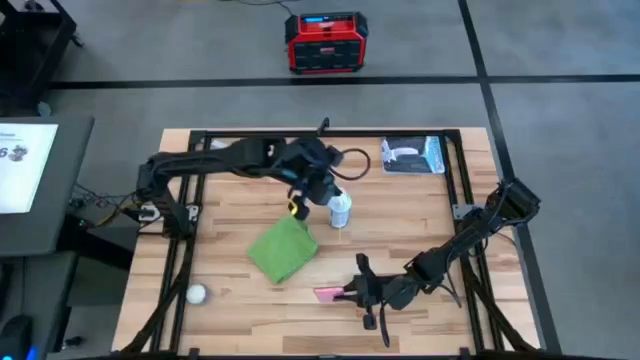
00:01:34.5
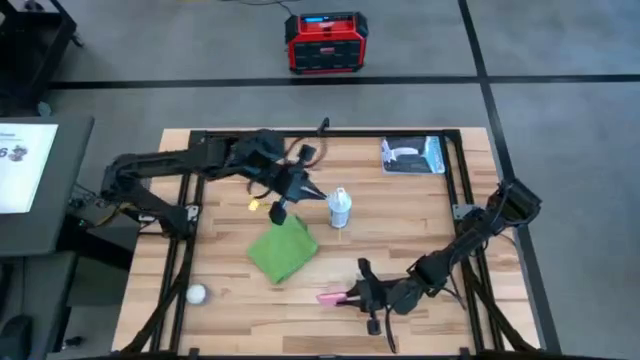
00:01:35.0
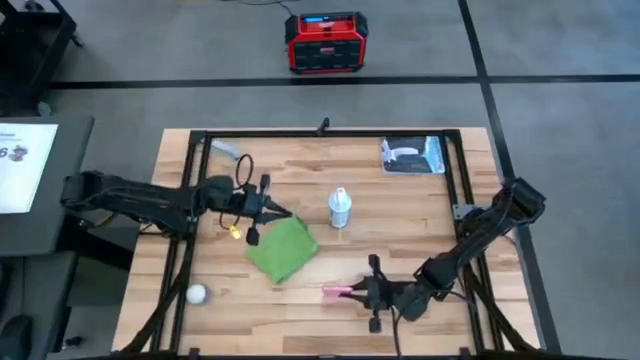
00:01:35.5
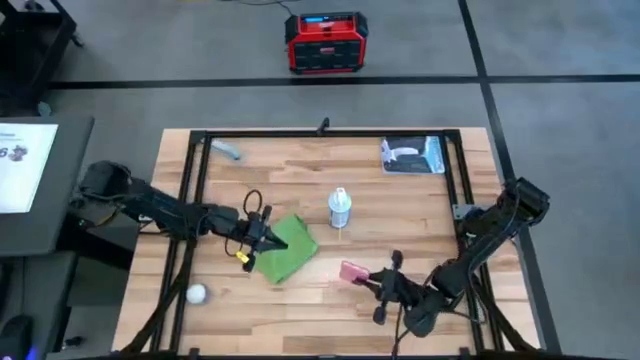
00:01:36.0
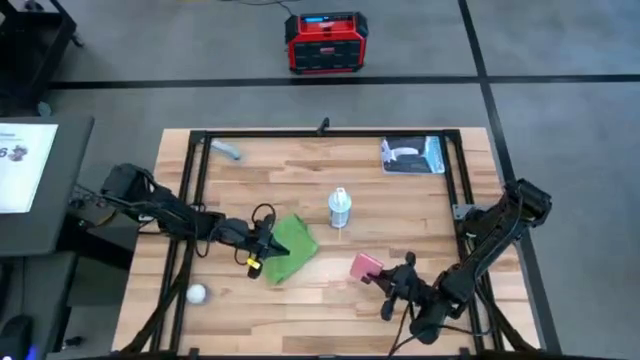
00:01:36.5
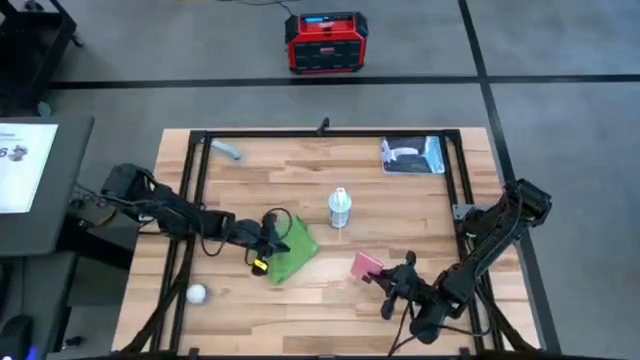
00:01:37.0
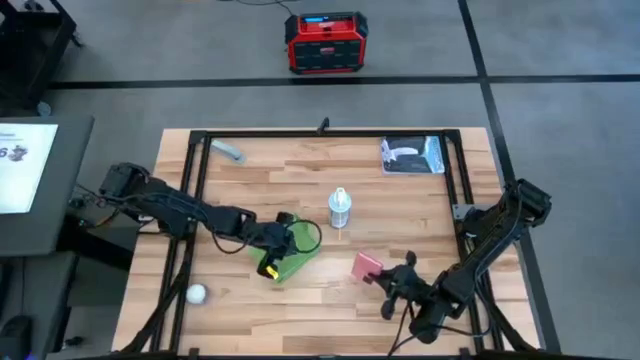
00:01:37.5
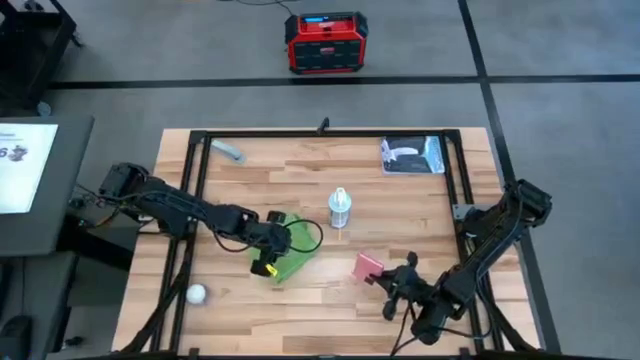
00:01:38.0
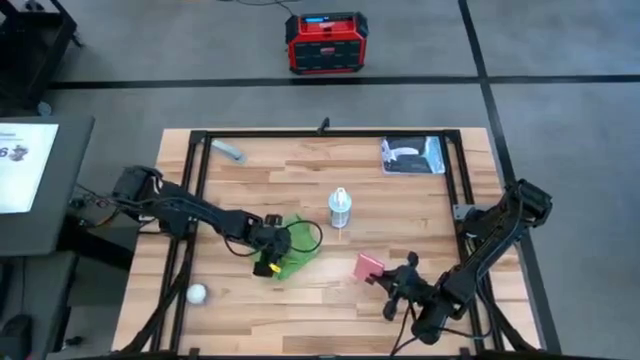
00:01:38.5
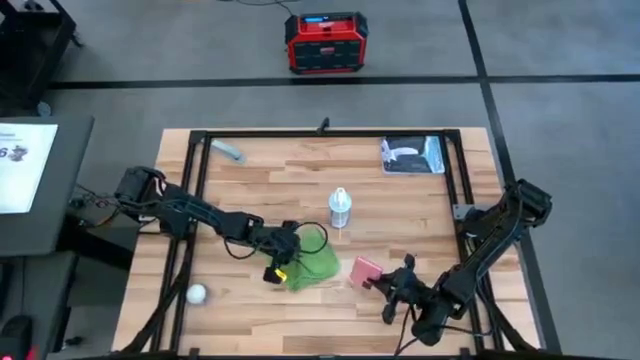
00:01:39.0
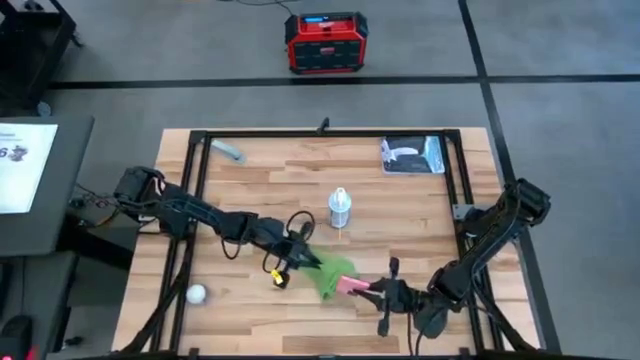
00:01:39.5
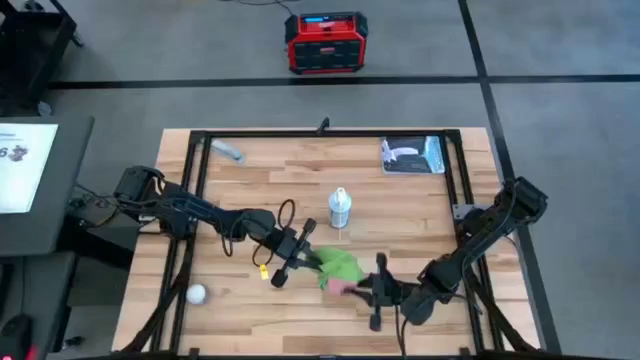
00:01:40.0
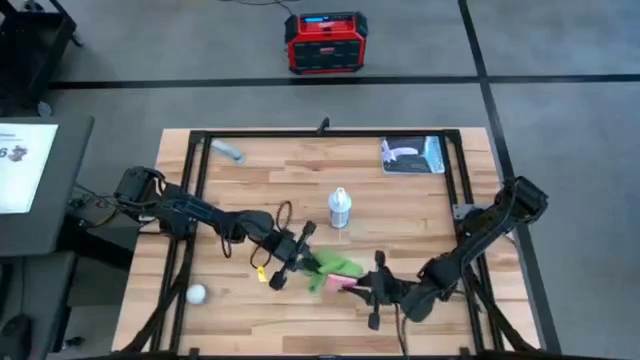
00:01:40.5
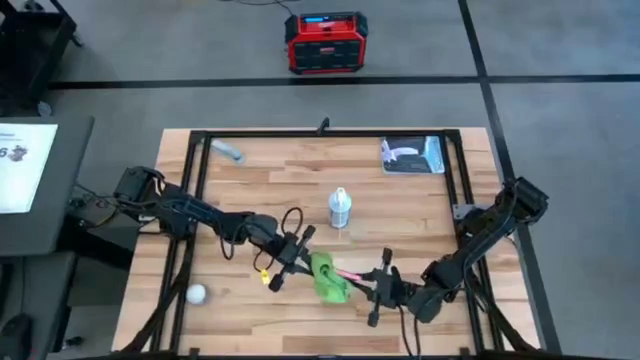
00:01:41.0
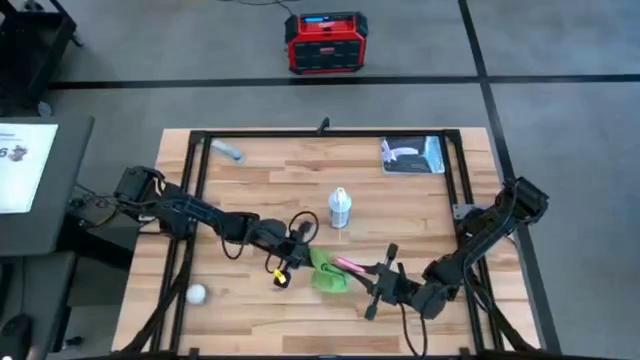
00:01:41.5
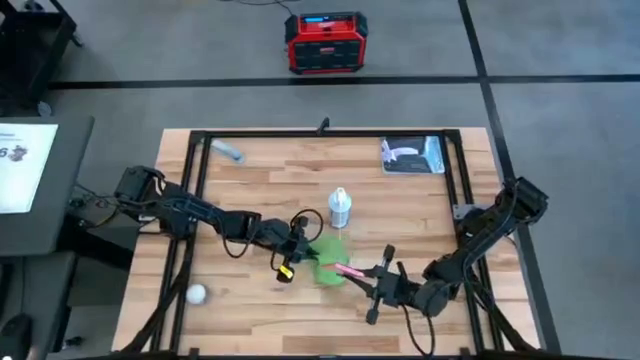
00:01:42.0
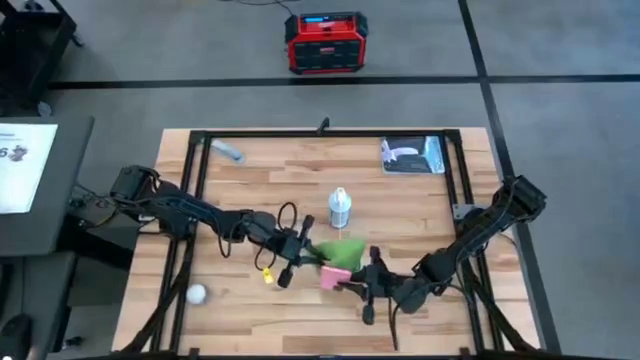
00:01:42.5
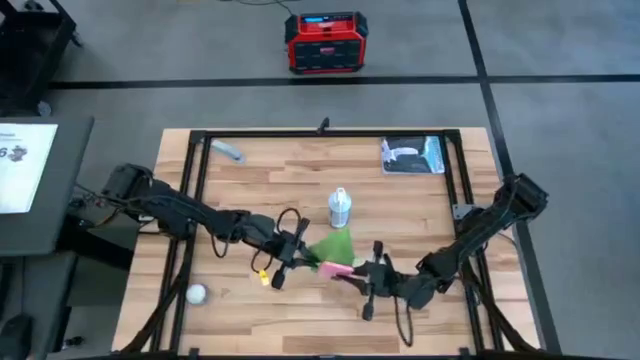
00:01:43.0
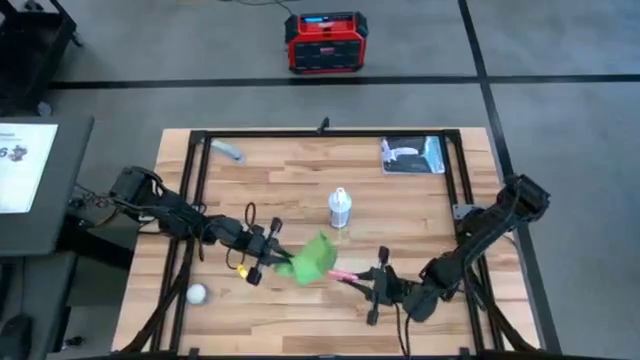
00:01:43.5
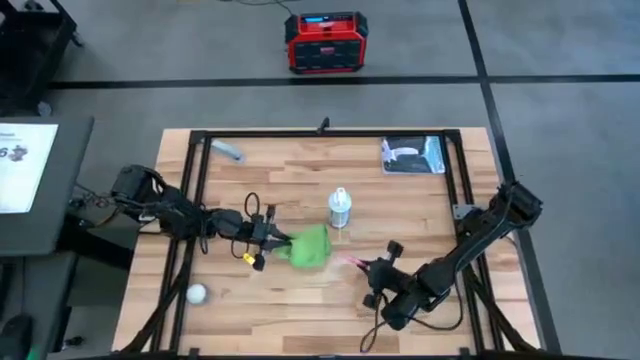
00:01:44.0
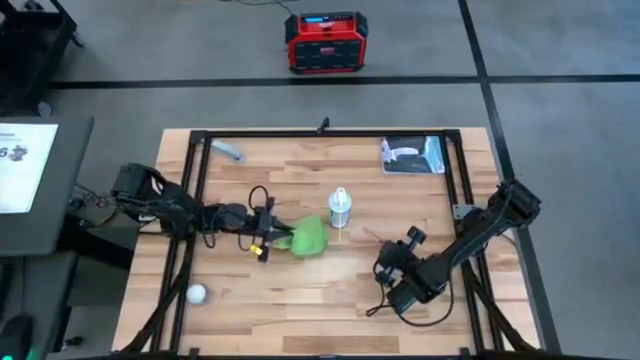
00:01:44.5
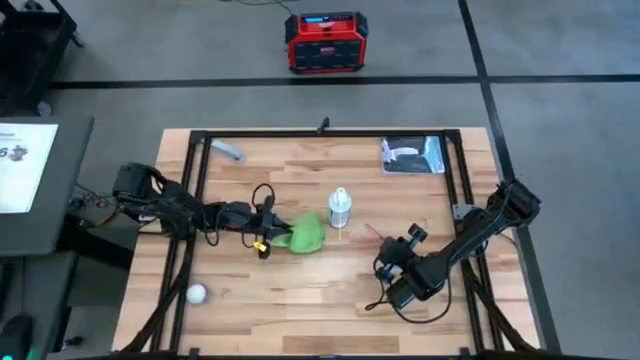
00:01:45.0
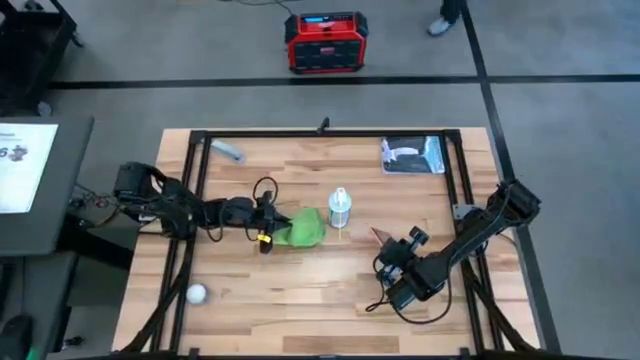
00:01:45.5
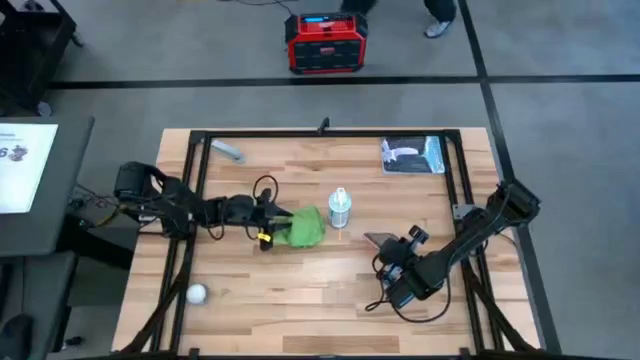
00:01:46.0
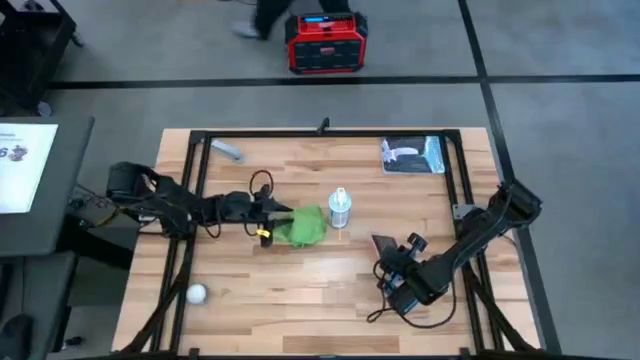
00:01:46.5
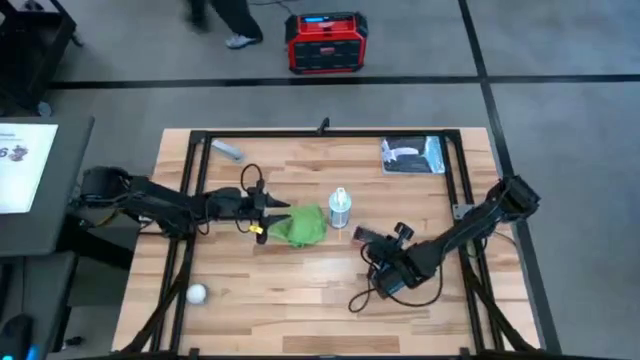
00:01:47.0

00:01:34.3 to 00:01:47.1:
Task: Apply microfiber cloth
Wipe the cellphone with a microfiber cloth

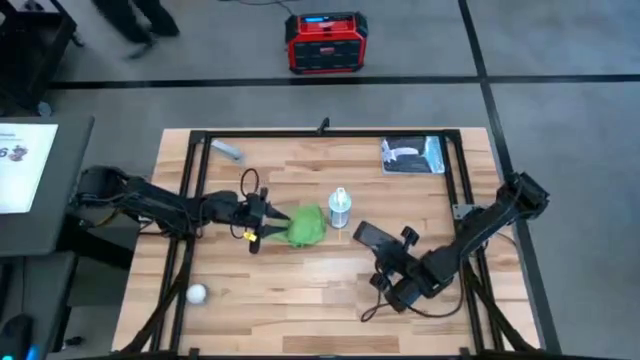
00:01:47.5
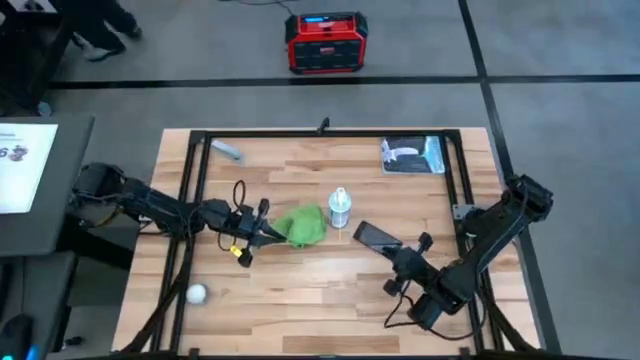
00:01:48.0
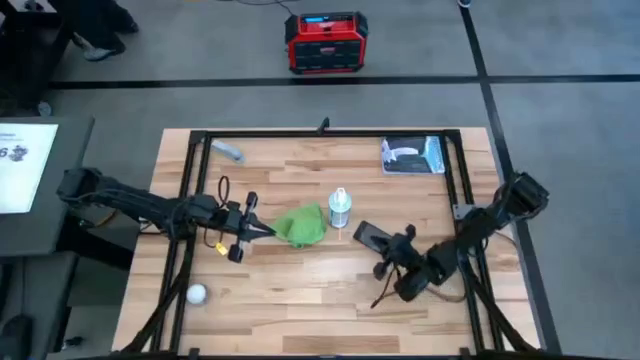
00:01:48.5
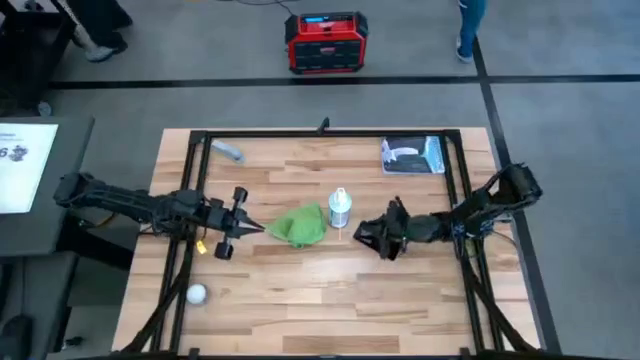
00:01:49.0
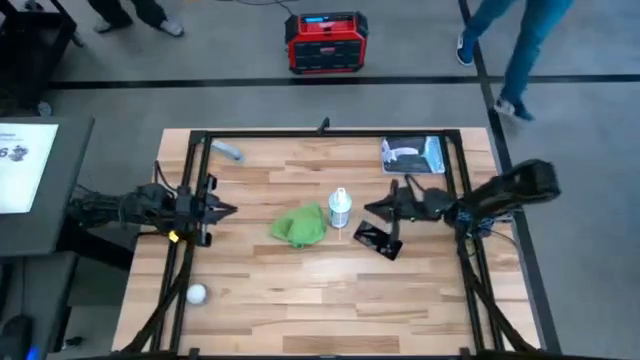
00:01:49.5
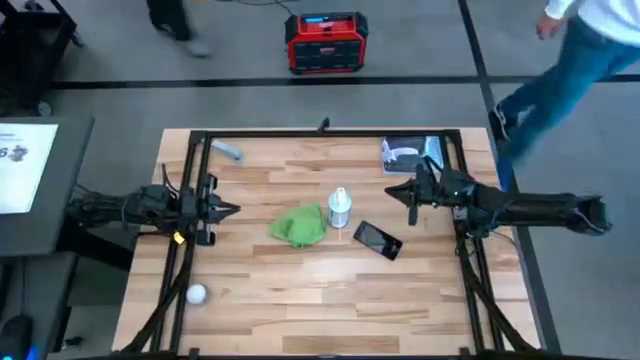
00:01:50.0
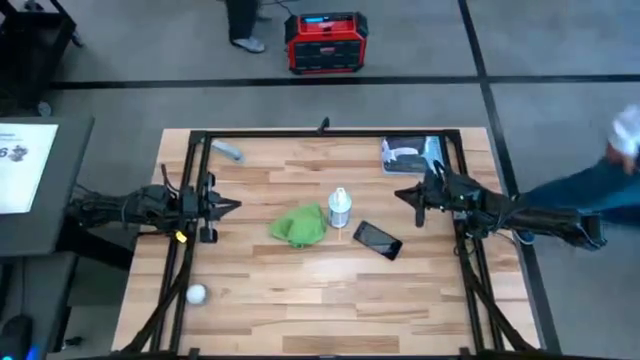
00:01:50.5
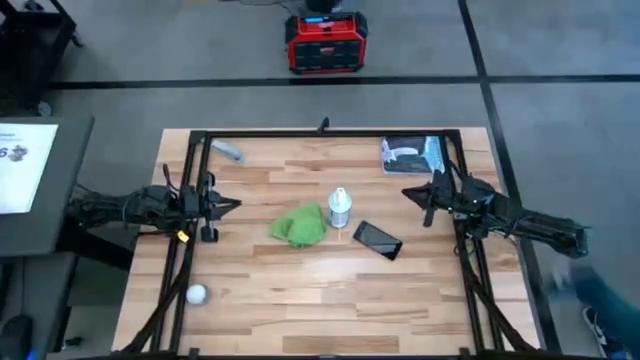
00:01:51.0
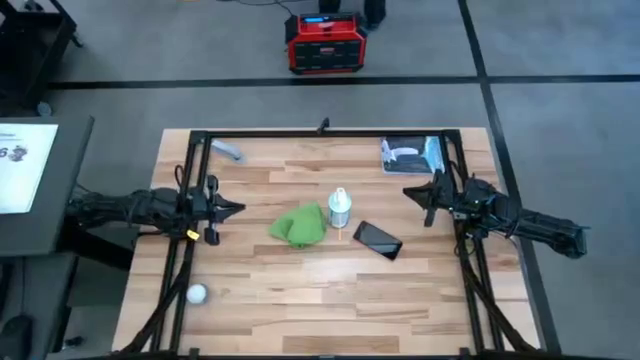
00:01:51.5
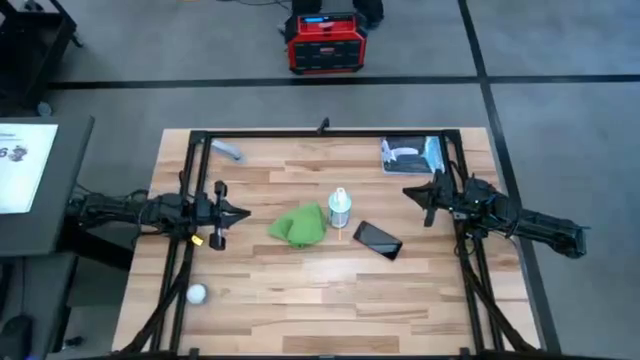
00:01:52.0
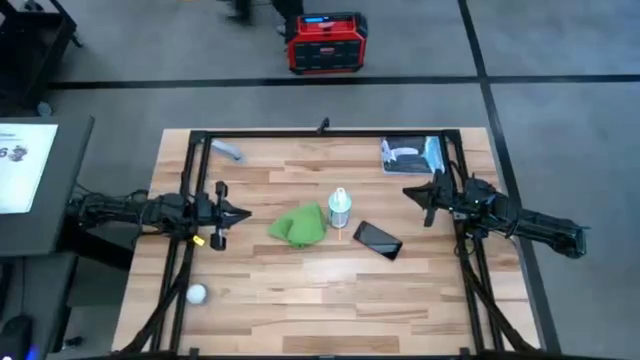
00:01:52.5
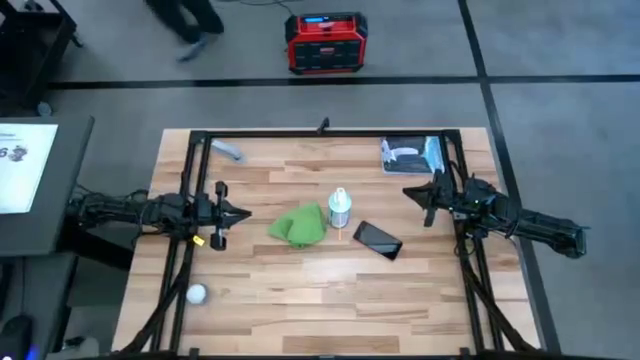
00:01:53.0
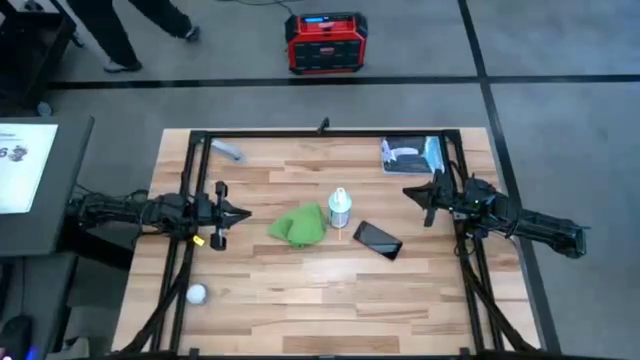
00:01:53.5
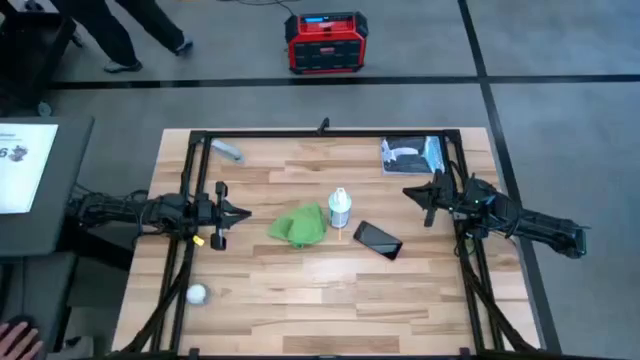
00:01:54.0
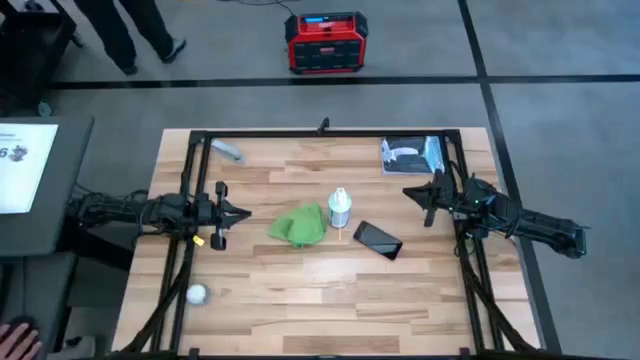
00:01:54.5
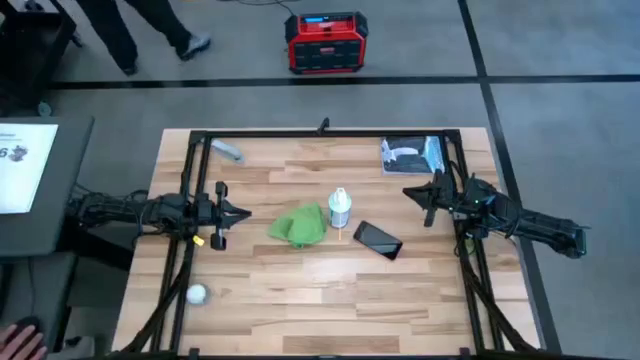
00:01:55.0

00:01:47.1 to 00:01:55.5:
Return to Home Position

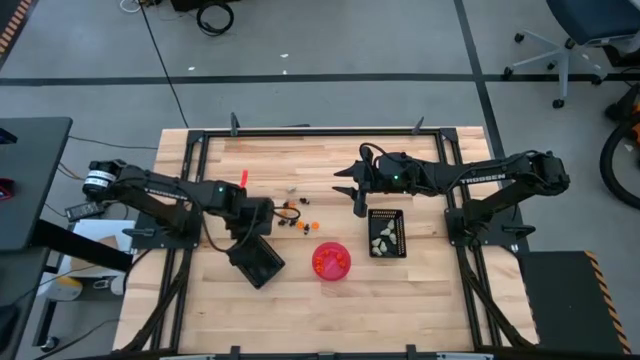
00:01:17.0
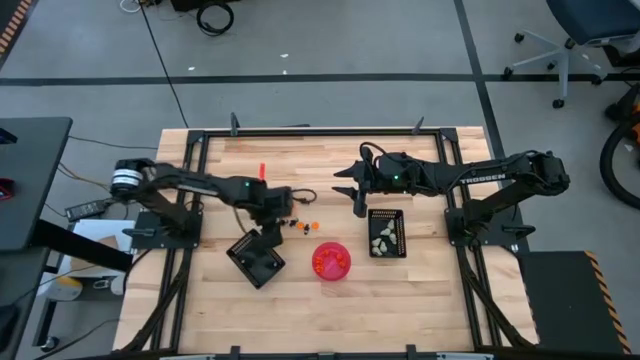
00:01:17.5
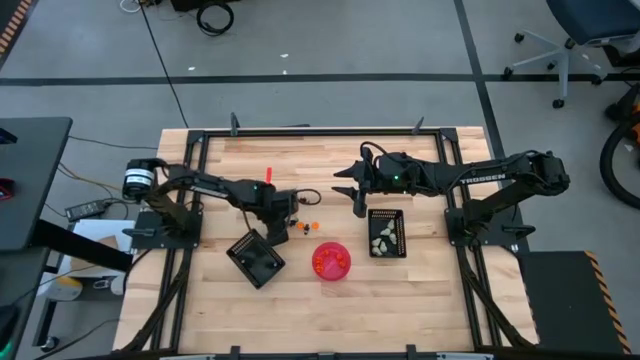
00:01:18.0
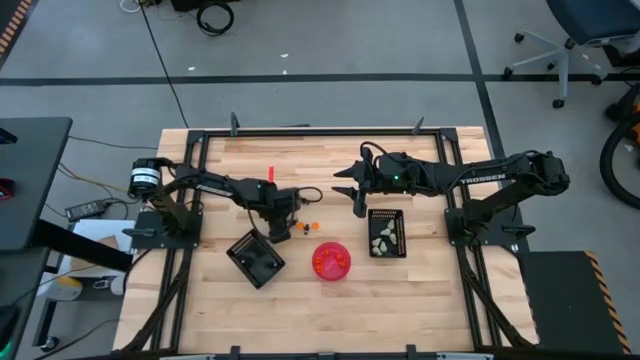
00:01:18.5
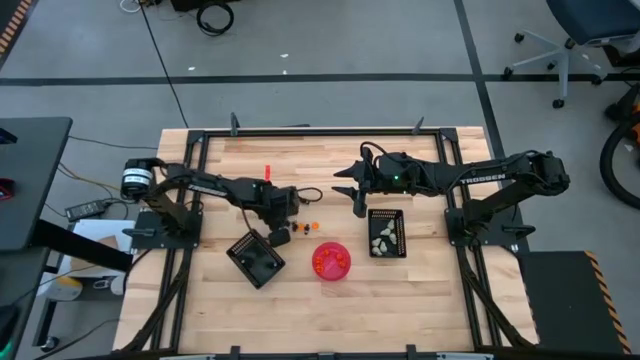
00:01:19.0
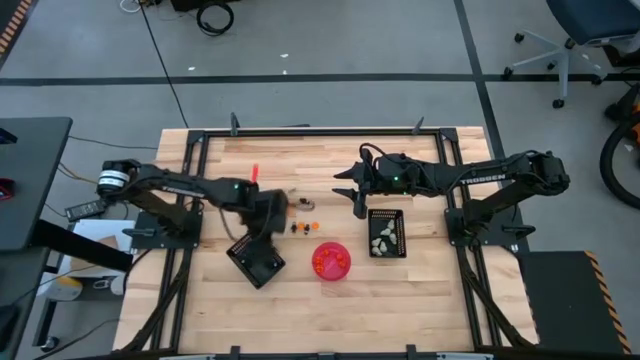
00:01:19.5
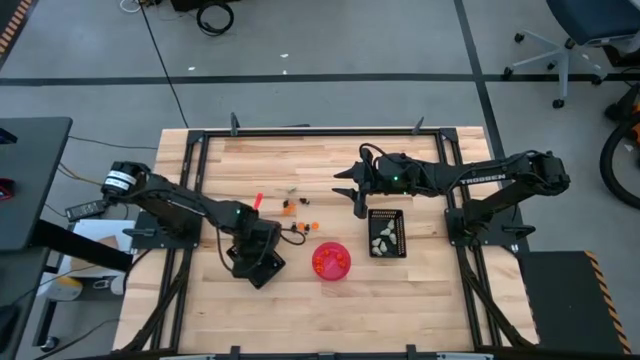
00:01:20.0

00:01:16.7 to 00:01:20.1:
Task: Sort Halloween decoration
Put the black skeleton toy into the bottom black bin
